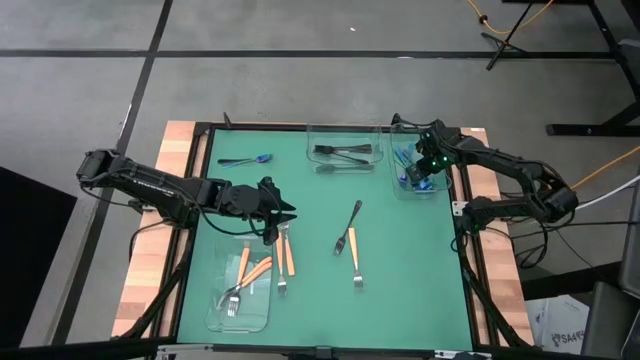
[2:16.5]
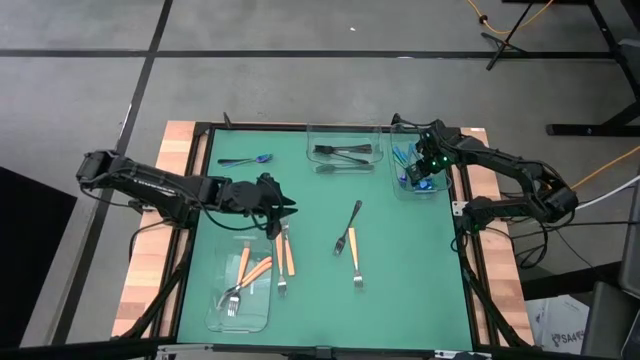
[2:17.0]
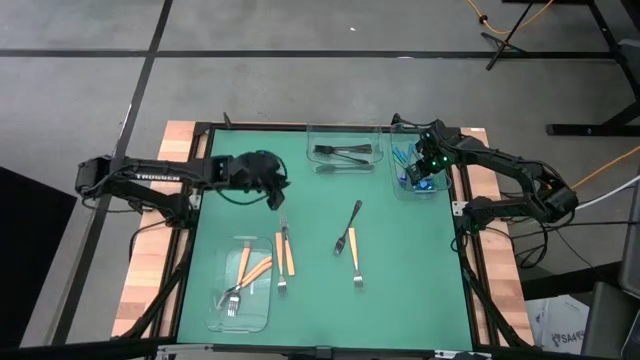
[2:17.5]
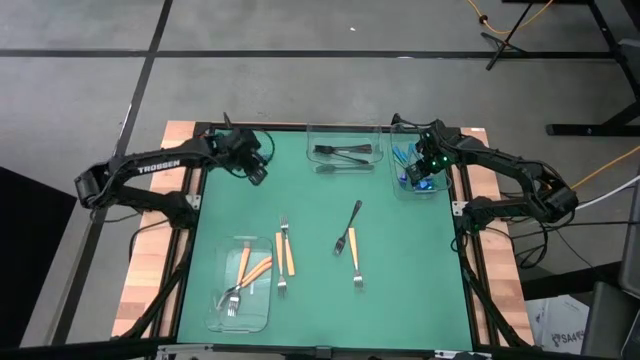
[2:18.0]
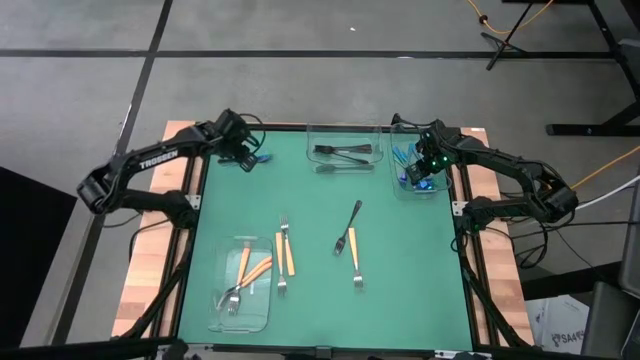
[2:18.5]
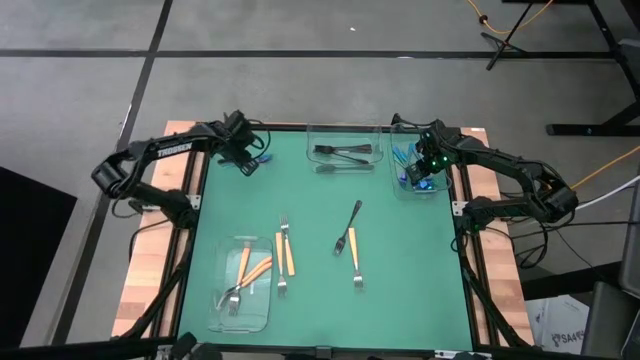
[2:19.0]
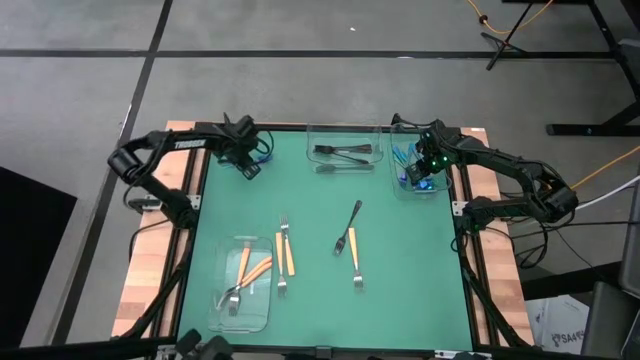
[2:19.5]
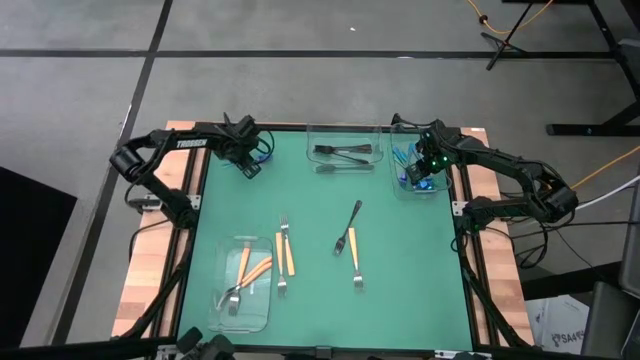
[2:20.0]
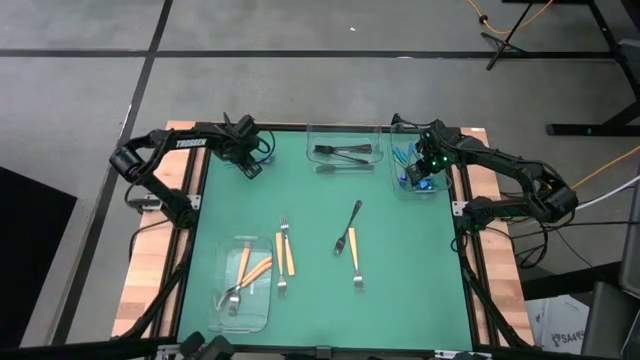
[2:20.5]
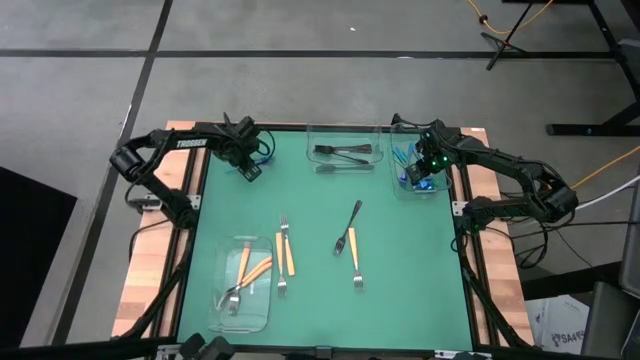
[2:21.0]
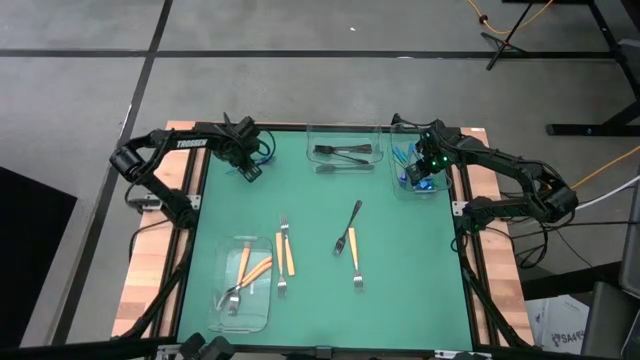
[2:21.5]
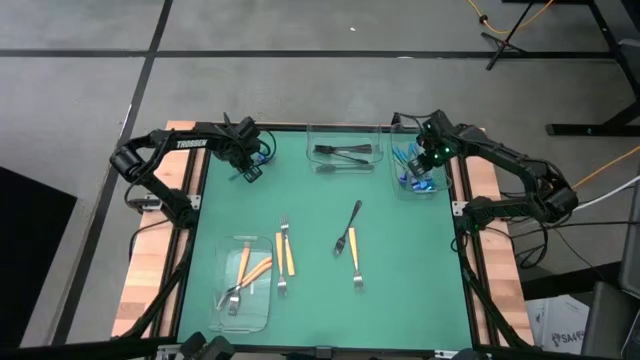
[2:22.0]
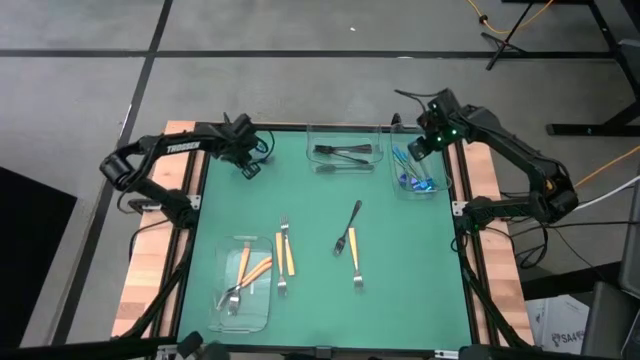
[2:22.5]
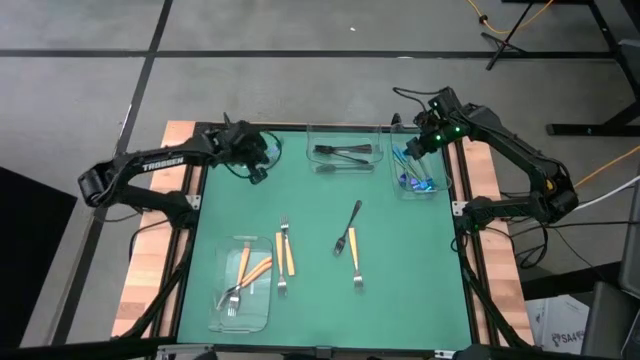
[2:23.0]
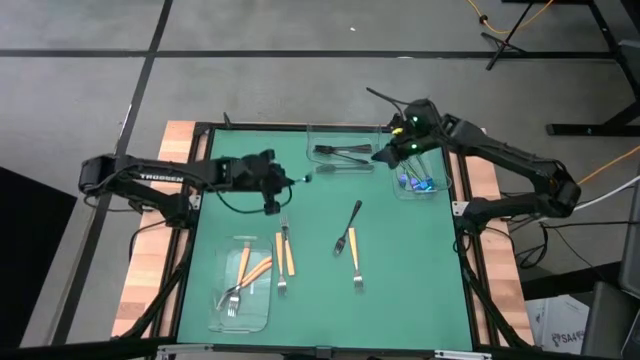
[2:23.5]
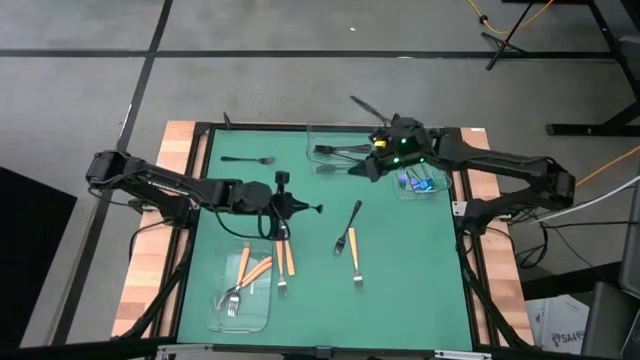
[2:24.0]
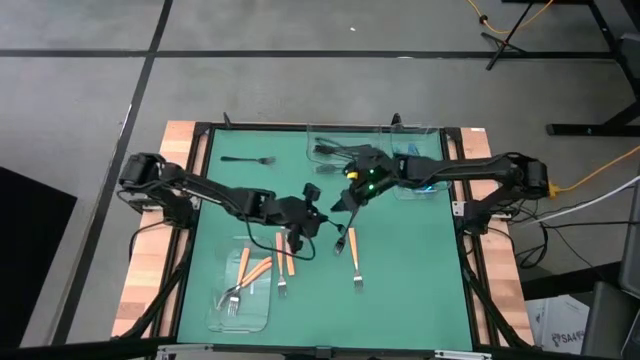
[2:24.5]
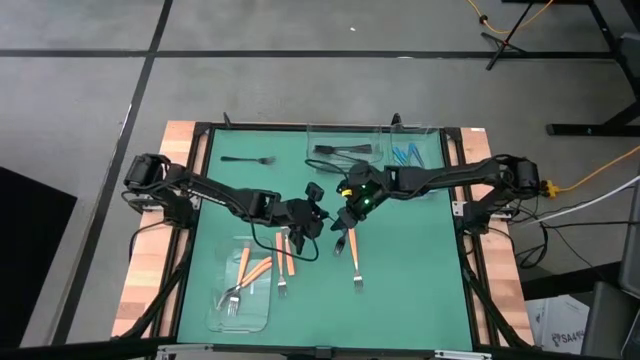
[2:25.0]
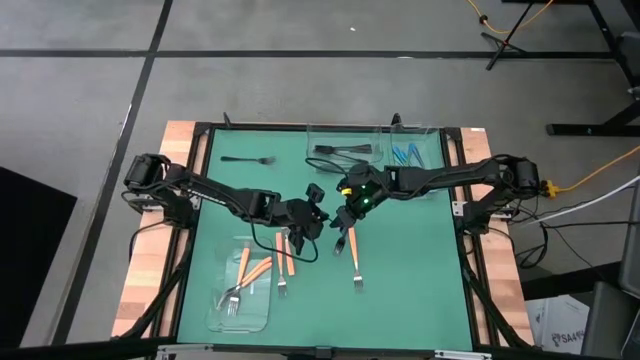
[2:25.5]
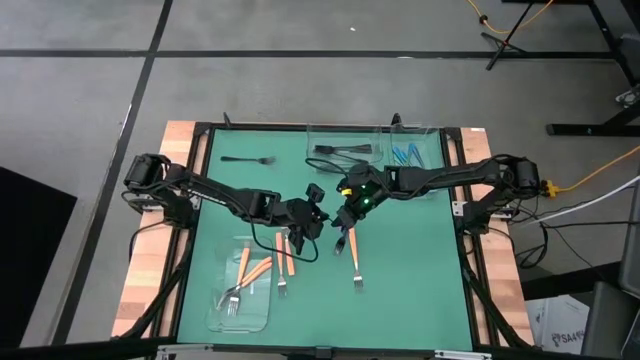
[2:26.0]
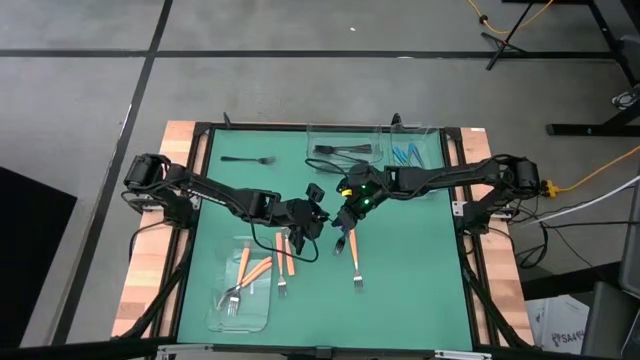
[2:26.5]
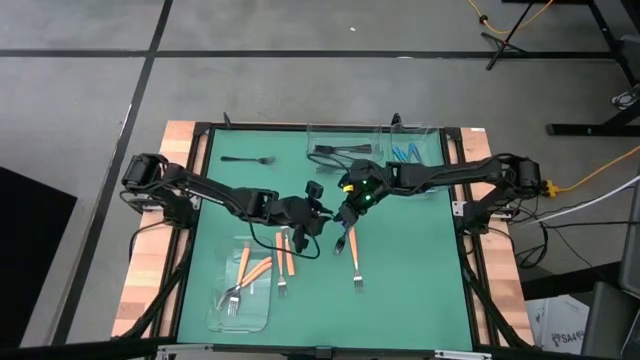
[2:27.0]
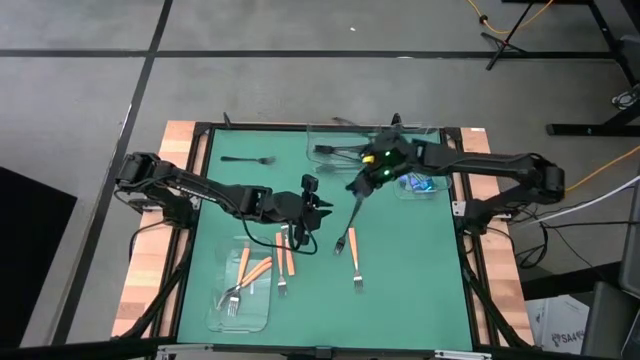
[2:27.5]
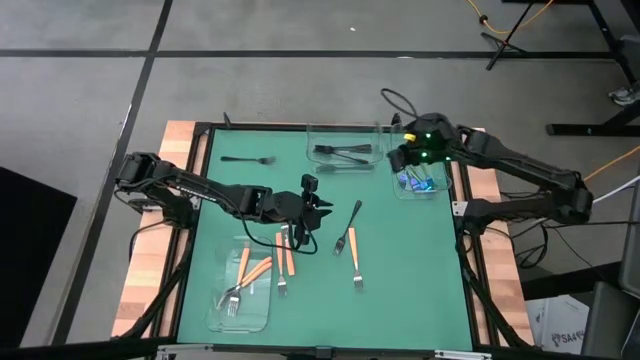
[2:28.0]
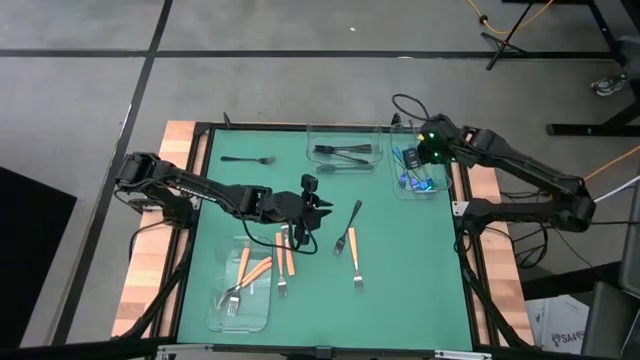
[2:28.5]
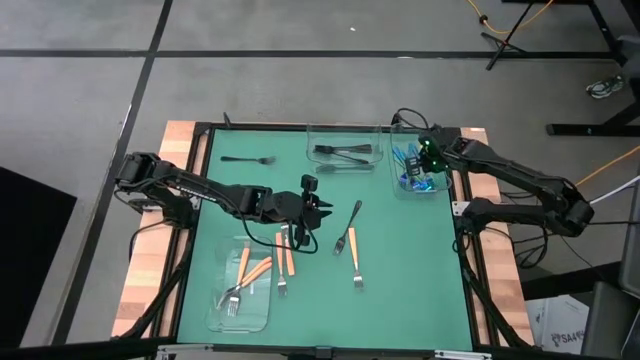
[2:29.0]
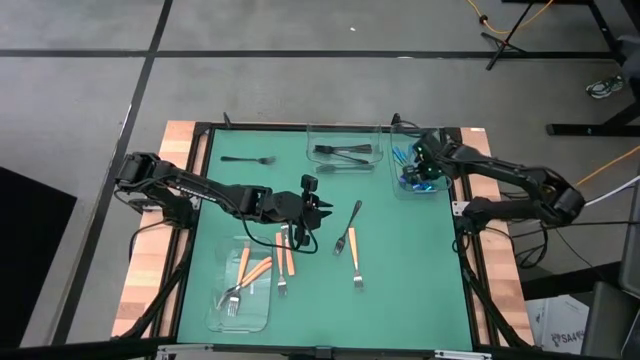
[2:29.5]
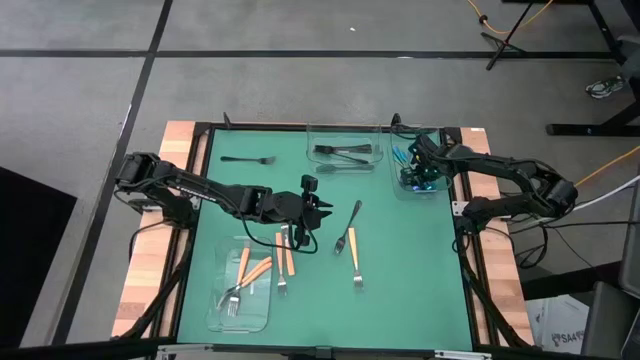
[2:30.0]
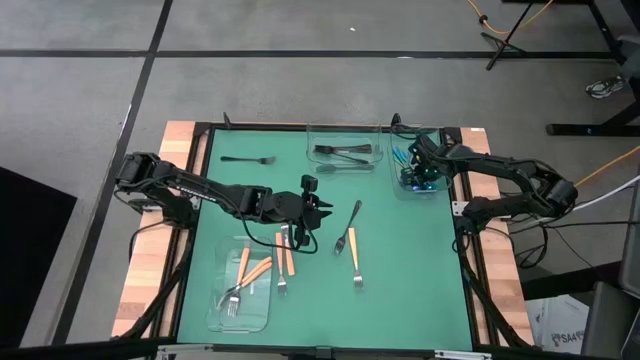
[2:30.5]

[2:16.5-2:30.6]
Task: Sort silverware by color (type)
Put the blue fork into the top right transparent bin

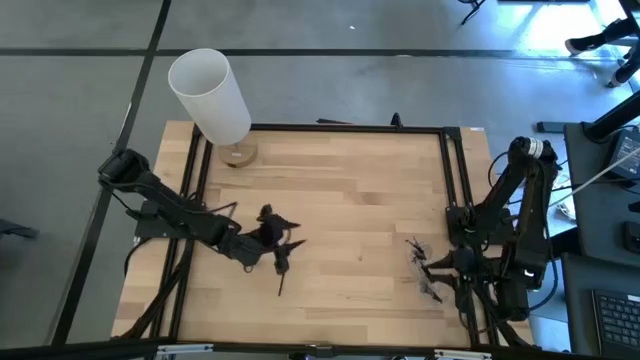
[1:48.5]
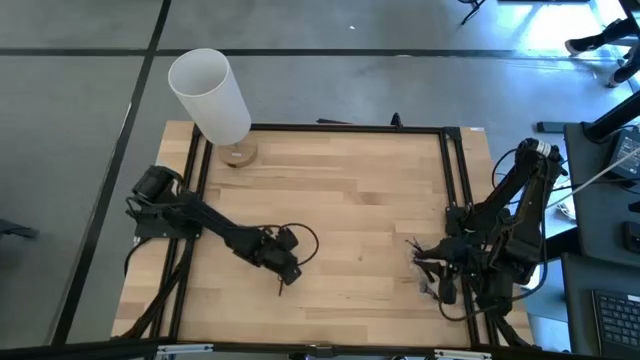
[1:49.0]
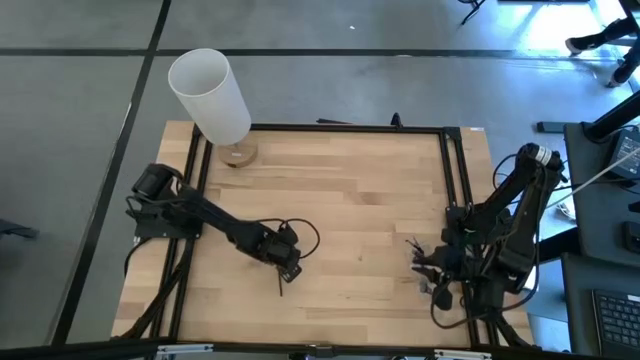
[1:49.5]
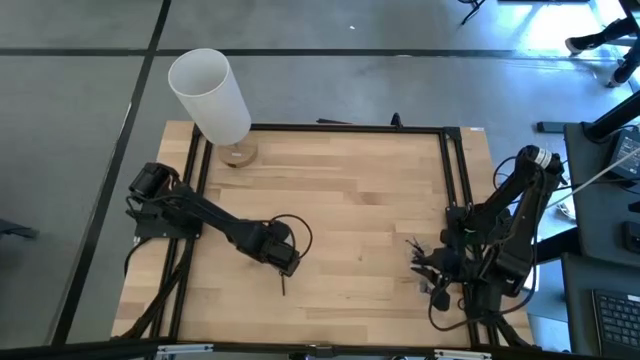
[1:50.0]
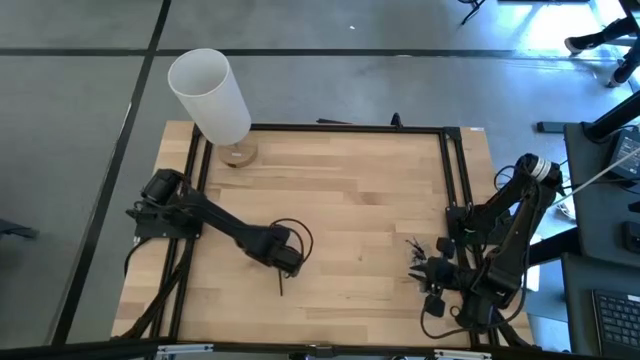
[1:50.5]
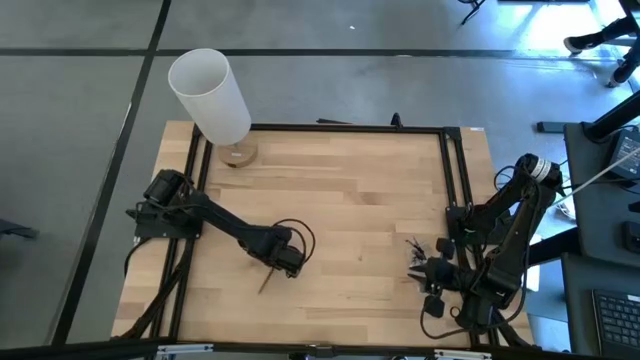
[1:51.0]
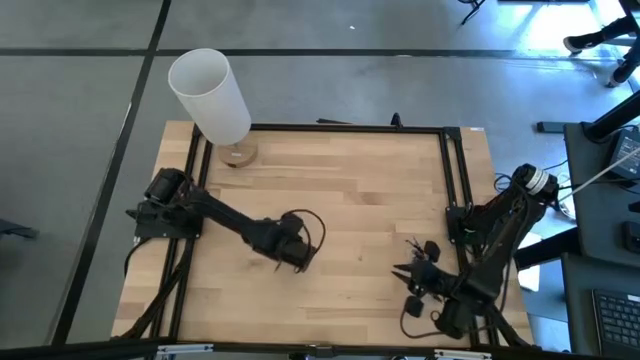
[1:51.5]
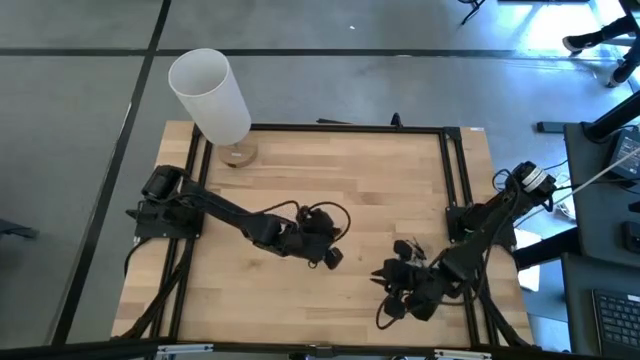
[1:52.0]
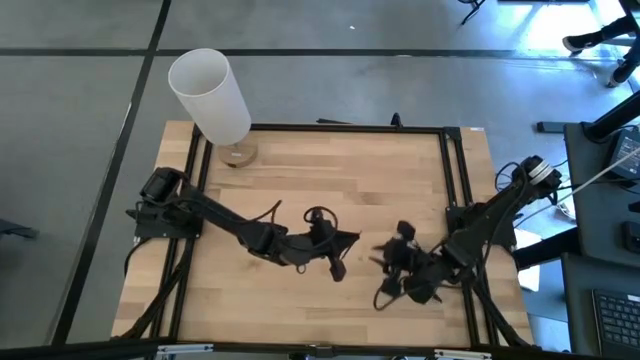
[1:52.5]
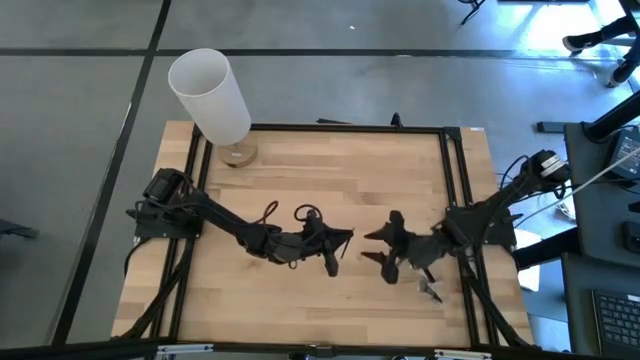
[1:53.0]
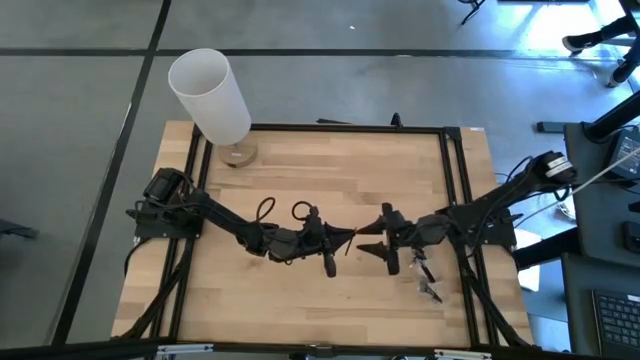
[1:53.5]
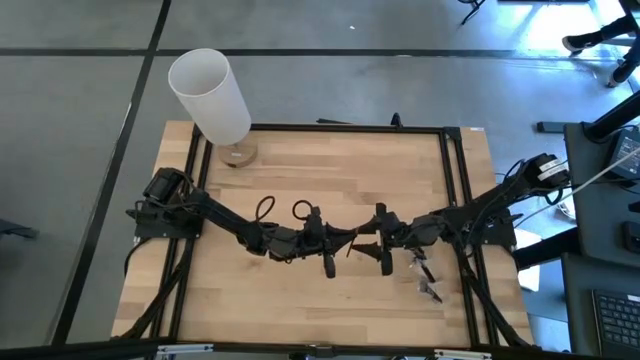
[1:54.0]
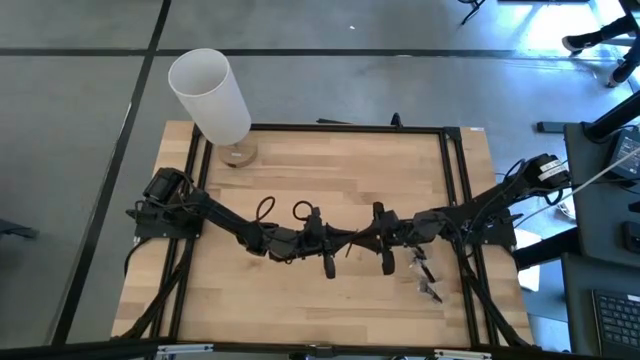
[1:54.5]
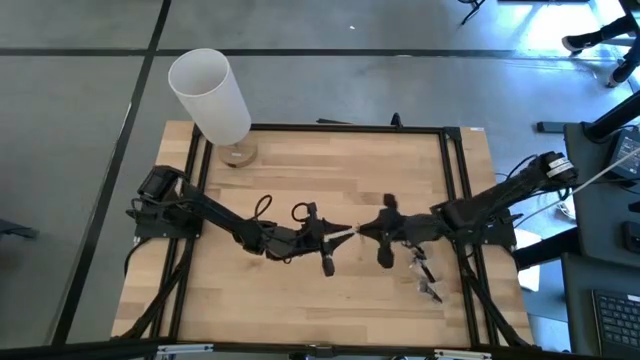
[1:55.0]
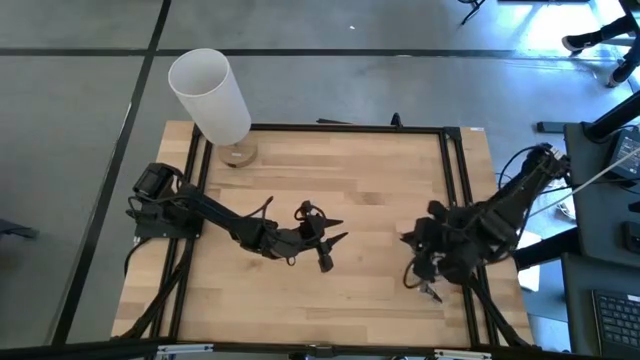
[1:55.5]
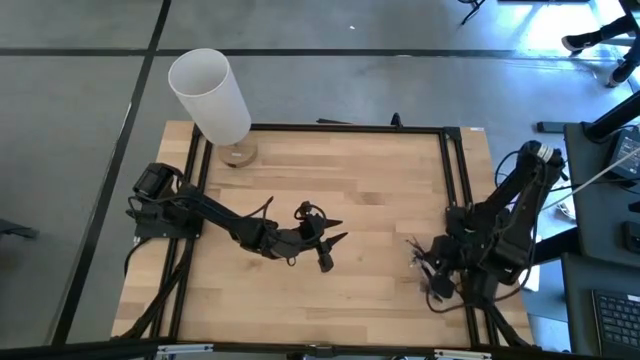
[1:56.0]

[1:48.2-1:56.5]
Task: Put items in baskets/containers
Put the black liner brush into the transparent organizer
